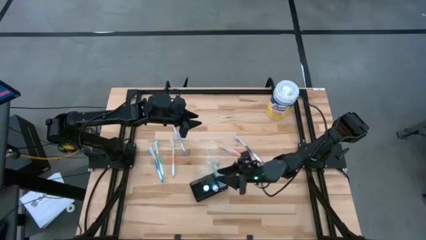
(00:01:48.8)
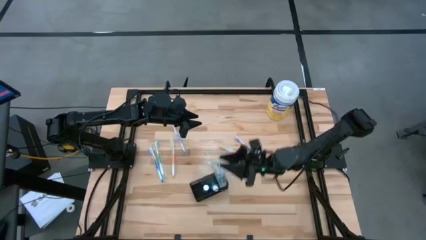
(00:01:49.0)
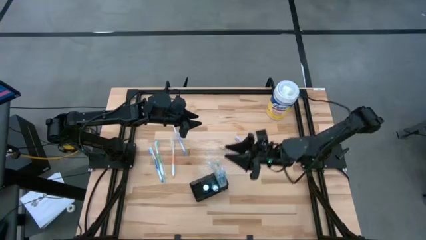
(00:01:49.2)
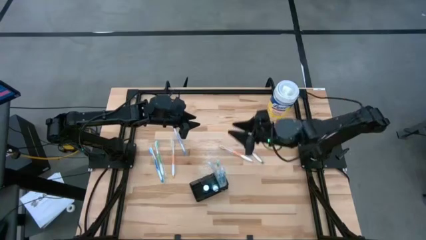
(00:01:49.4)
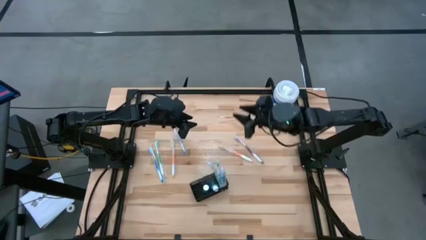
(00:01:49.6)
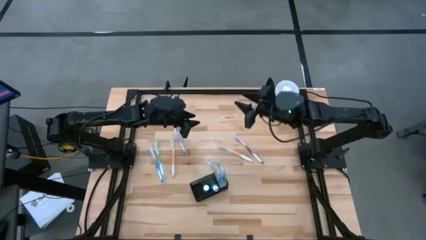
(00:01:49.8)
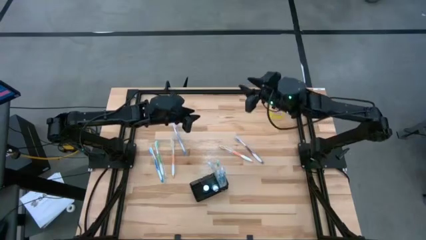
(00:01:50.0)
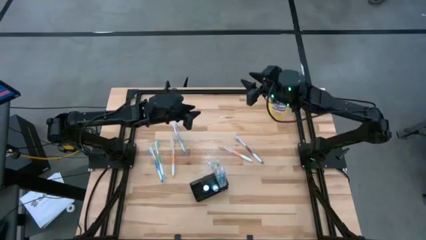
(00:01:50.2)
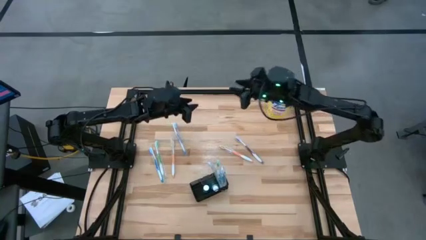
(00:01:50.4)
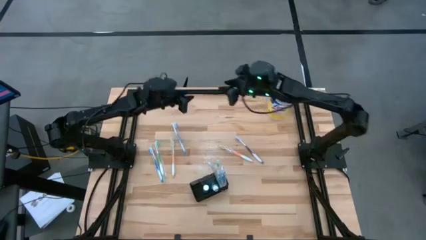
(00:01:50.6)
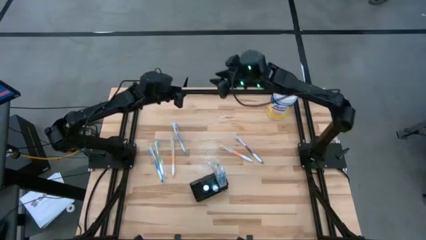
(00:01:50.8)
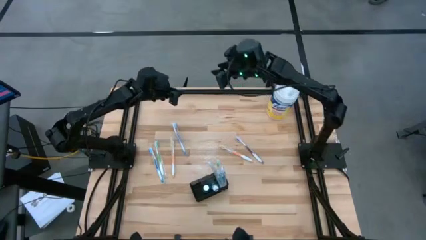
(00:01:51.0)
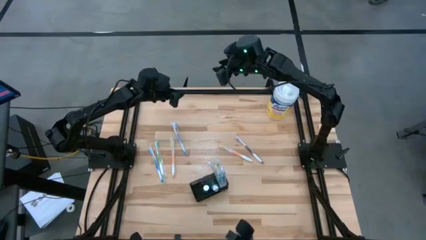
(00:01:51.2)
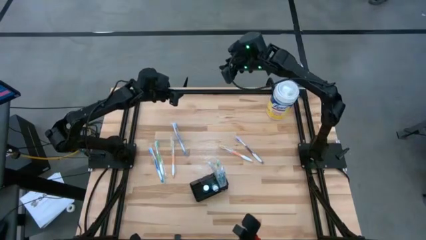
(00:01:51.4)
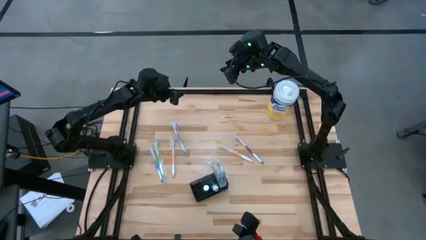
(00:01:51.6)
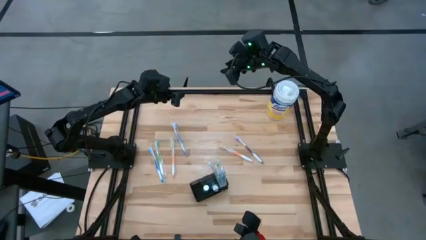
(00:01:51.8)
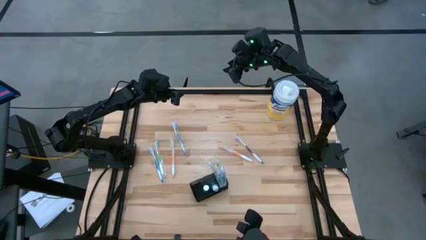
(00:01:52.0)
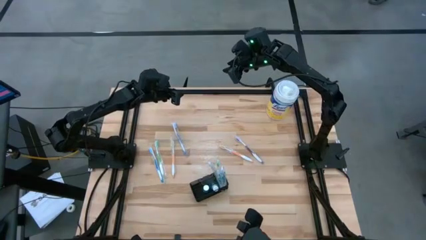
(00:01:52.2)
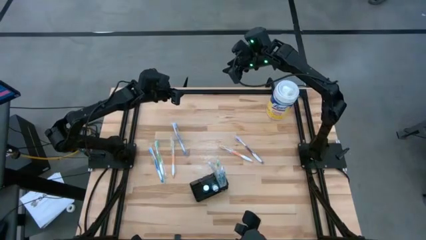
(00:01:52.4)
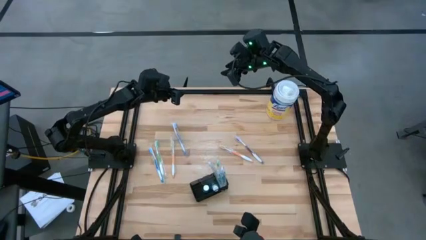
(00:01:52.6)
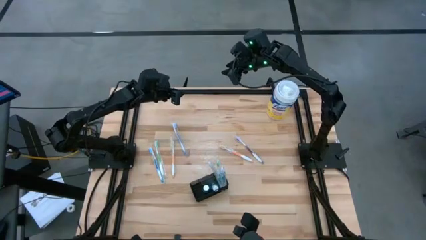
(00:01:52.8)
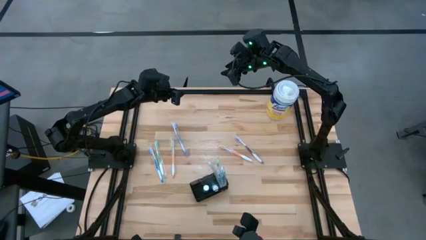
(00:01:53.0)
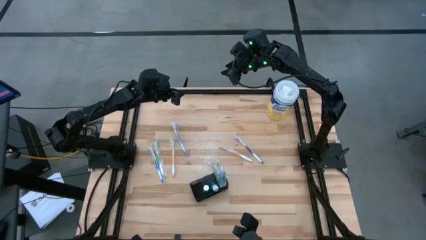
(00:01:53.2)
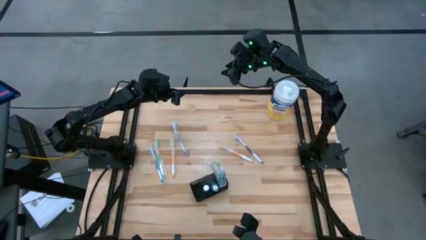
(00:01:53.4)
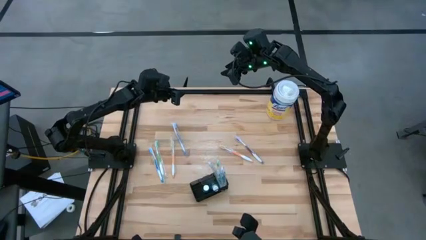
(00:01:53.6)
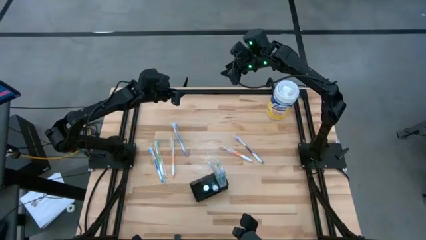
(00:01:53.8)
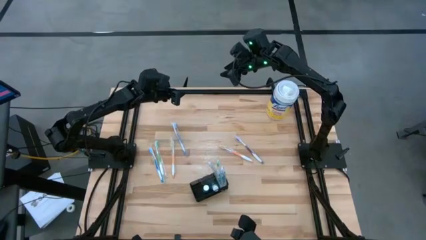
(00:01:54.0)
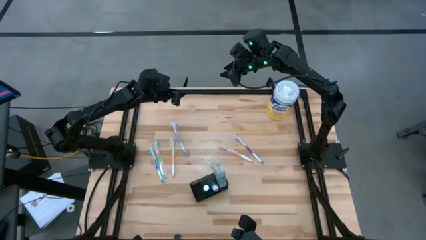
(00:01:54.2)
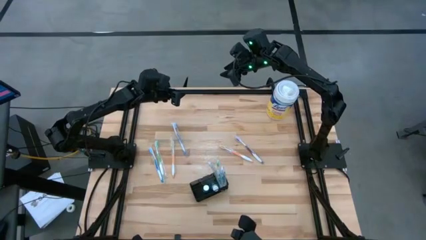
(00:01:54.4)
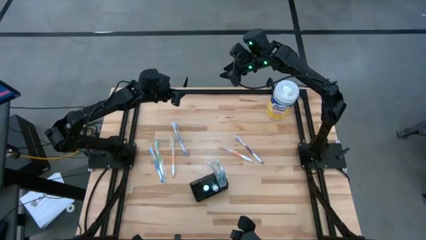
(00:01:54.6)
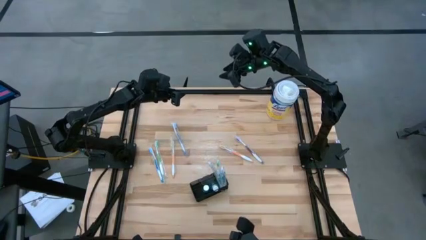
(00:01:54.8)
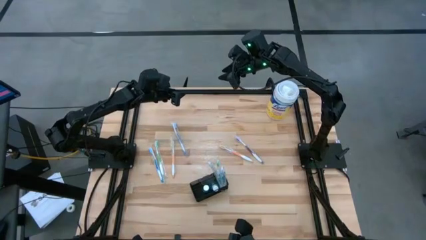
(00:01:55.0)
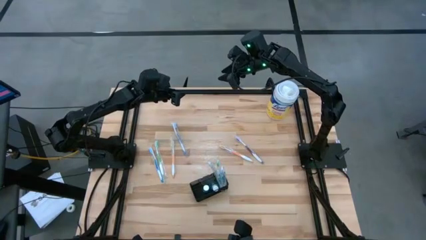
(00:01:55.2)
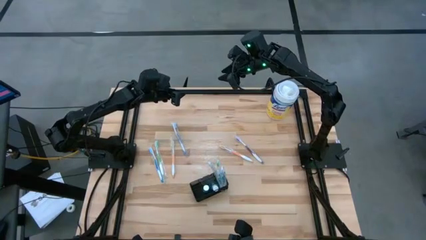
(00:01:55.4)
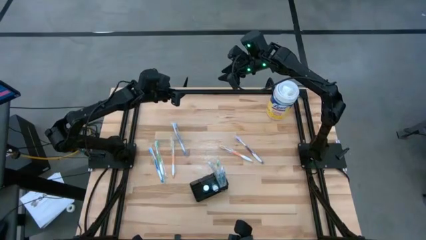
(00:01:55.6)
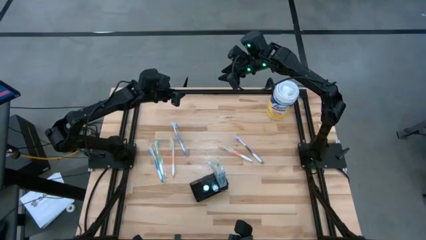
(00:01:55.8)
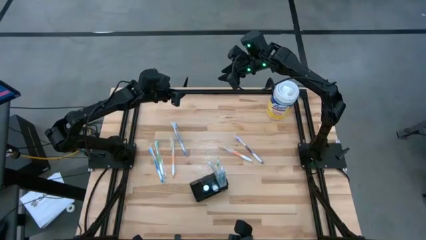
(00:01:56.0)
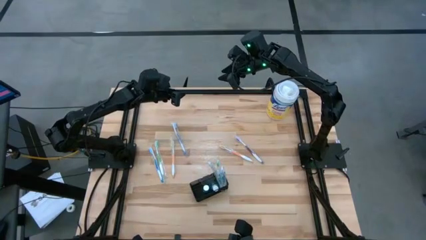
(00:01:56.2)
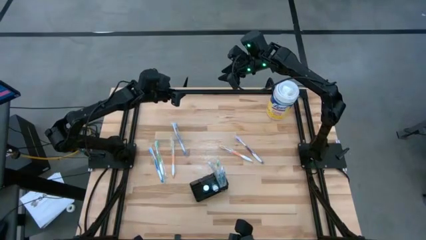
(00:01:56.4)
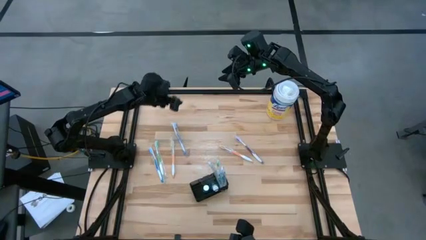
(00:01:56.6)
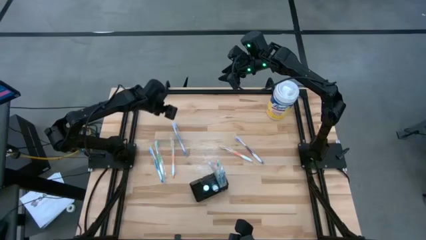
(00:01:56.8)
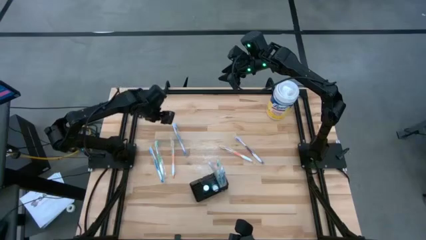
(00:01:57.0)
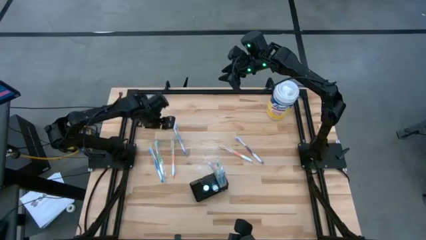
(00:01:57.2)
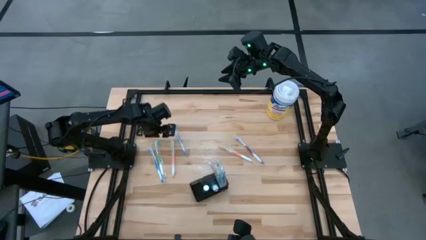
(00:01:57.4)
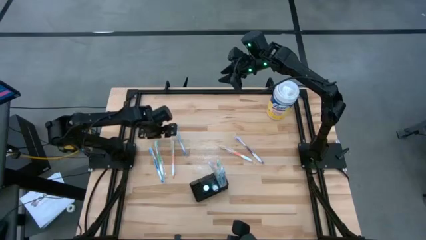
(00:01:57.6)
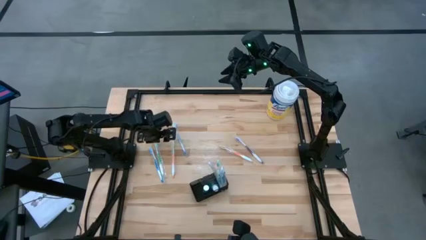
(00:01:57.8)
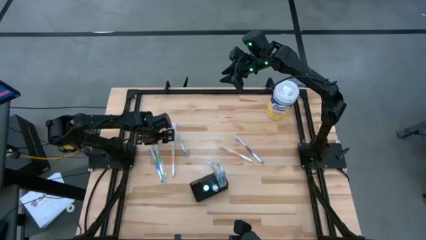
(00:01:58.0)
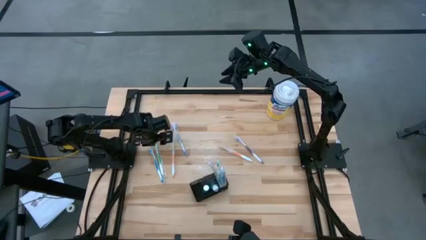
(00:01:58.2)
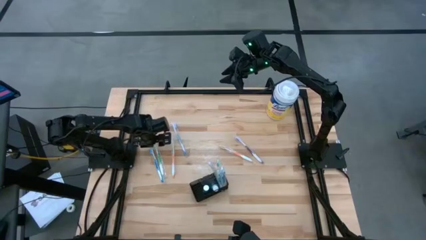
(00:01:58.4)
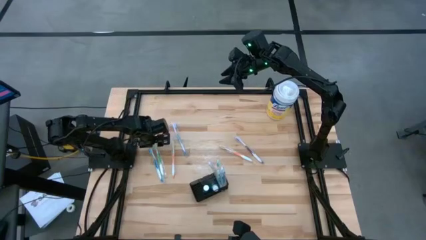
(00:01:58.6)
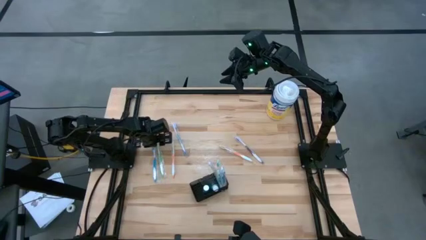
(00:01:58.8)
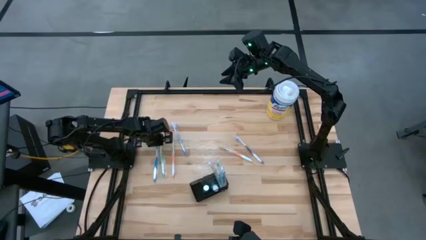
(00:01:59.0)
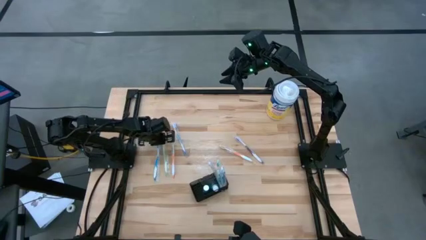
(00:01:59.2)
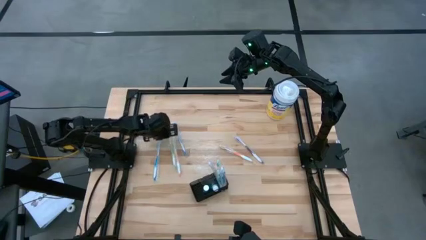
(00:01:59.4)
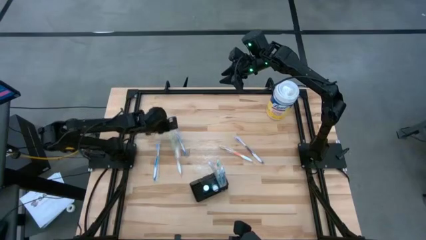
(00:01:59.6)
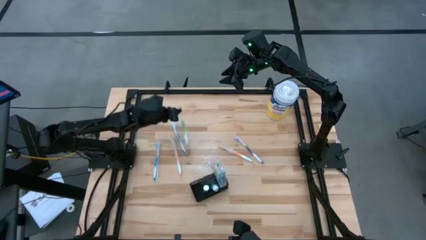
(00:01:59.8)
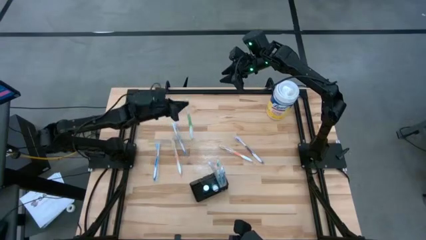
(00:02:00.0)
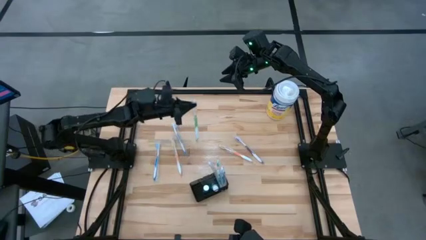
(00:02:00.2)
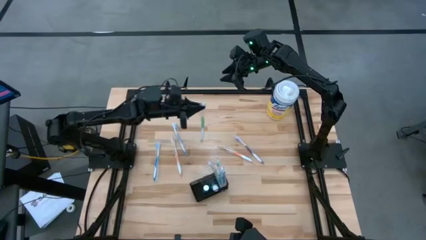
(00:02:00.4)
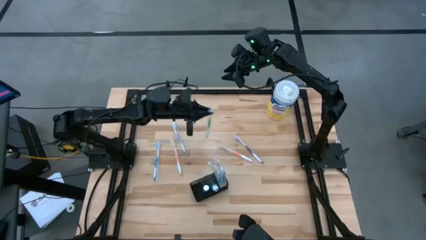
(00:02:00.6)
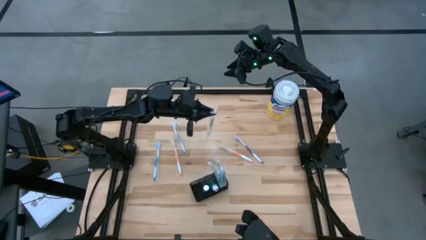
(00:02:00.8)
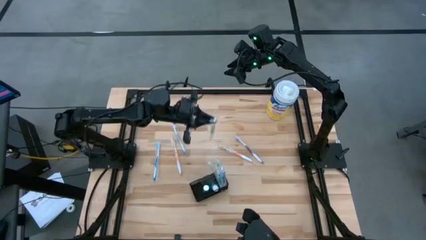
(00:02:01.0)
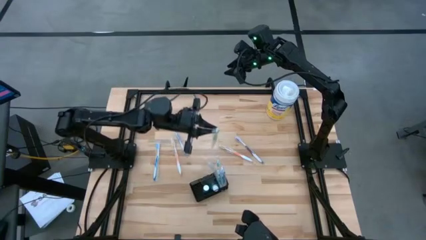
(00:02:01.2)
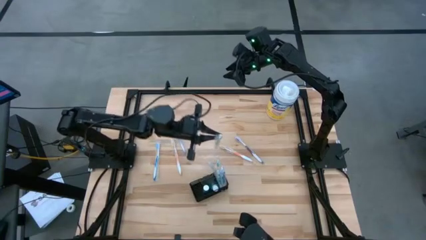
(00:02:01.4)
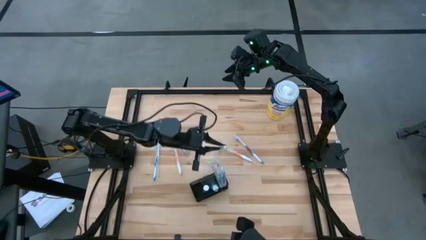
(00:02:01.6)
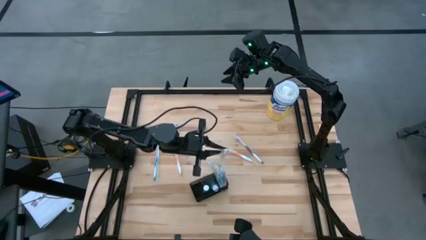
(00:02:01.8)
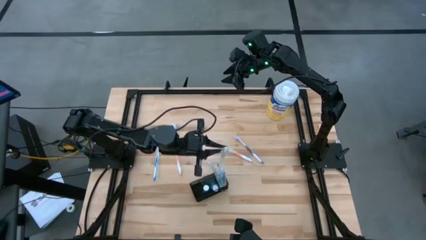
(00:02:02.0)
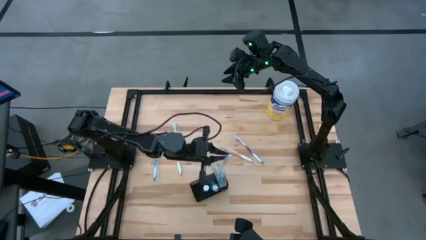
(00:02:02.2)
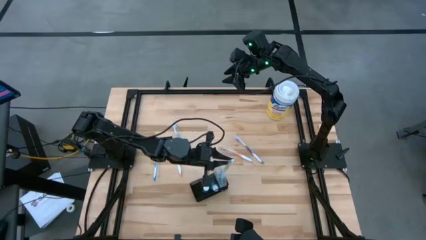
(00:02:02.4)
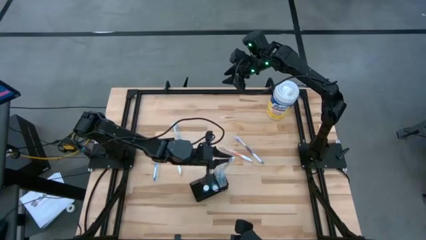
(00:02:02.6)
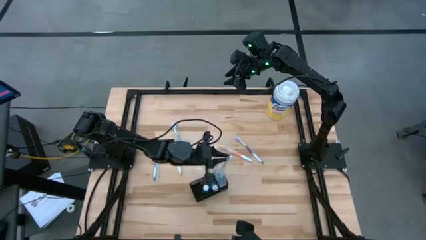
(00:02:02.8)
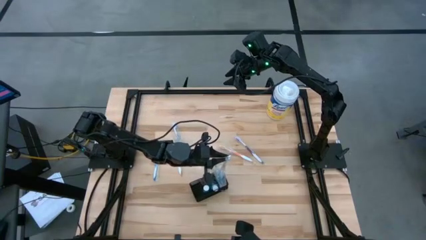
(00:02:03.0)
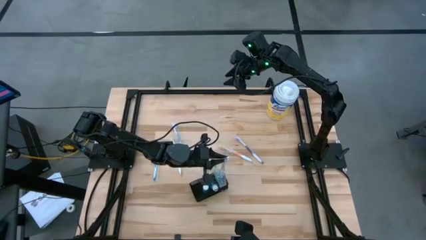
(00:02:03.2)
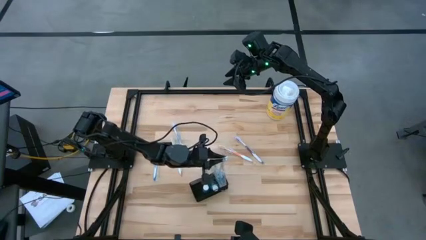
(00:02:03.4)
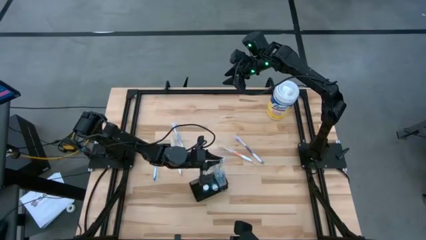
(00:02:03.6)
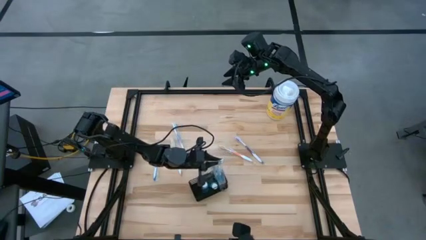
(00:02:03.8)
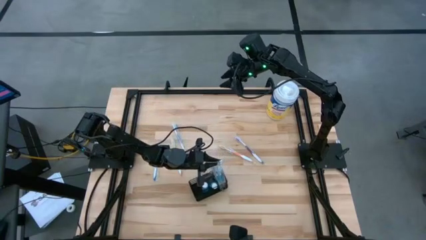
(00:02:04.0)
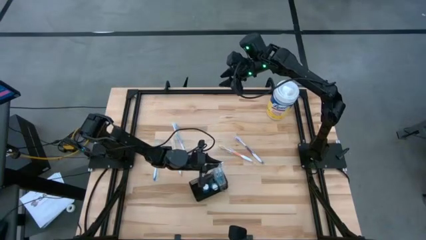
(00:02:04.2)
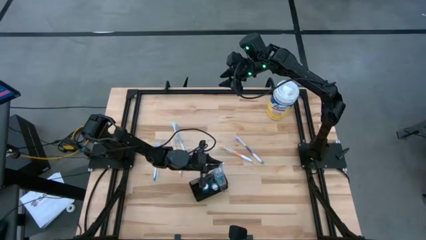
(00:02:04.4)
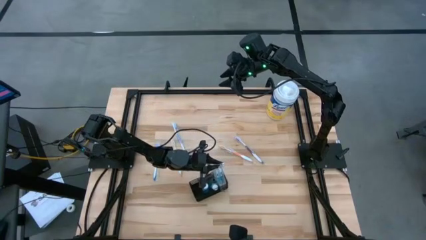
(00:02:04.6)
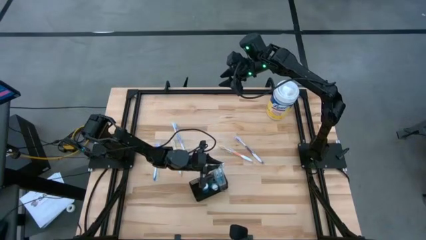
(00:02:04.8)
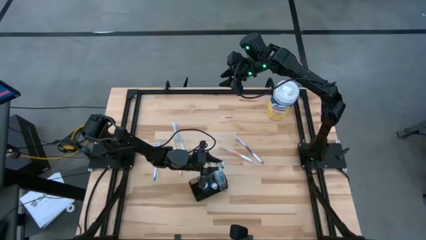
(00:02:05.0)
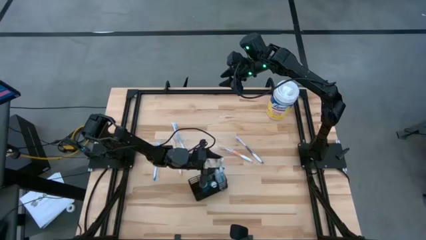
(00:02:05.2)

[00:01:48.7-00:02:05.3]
Task: Pick & Place toothbrushing station
Put the green toothbrush into the mesh organizer
